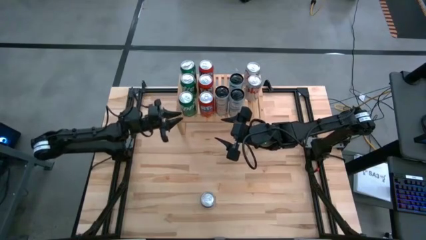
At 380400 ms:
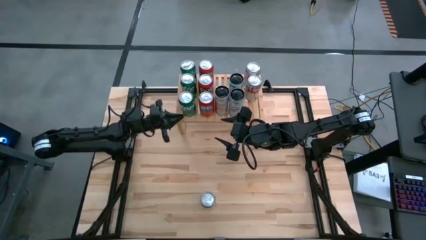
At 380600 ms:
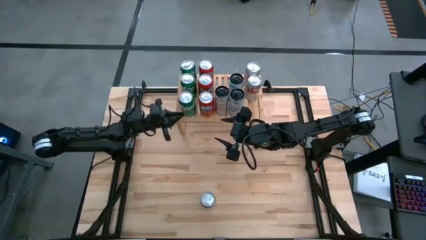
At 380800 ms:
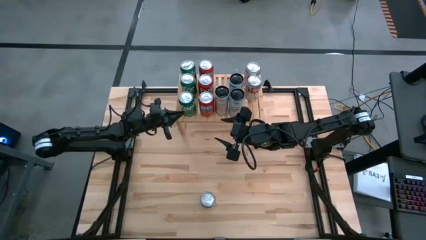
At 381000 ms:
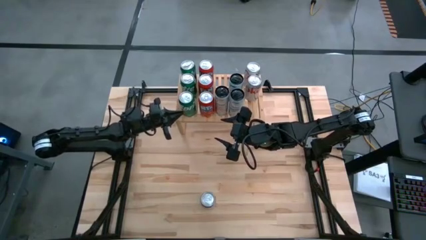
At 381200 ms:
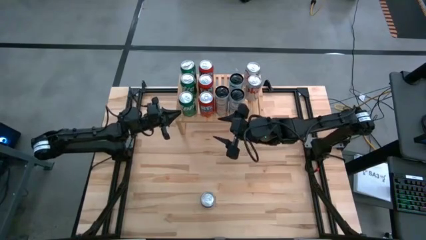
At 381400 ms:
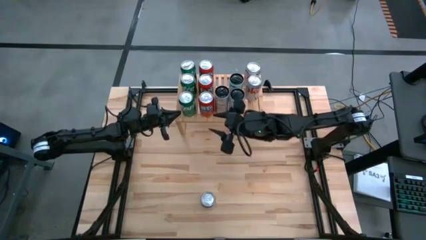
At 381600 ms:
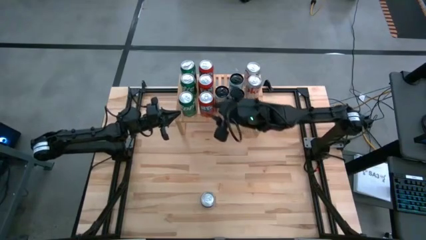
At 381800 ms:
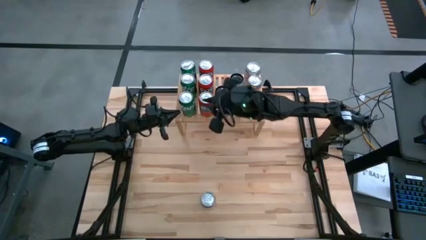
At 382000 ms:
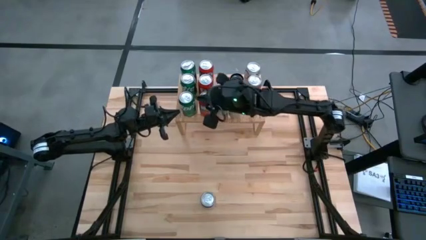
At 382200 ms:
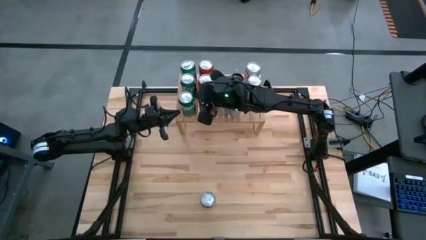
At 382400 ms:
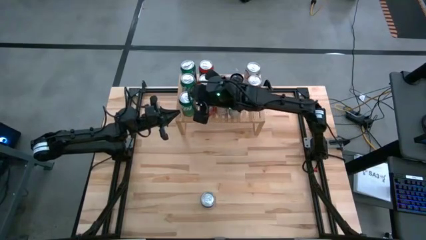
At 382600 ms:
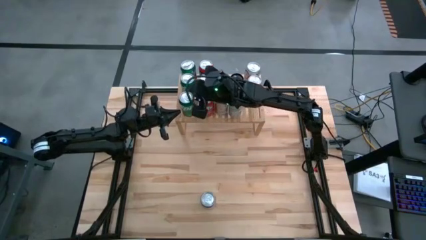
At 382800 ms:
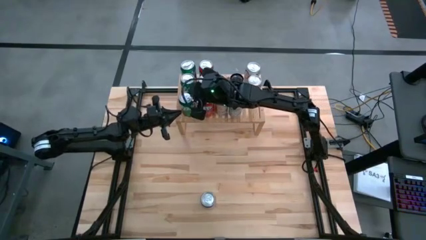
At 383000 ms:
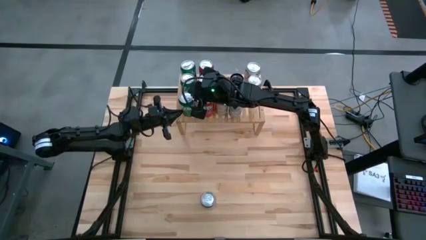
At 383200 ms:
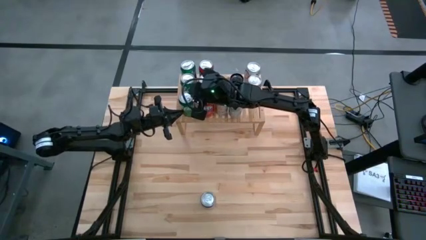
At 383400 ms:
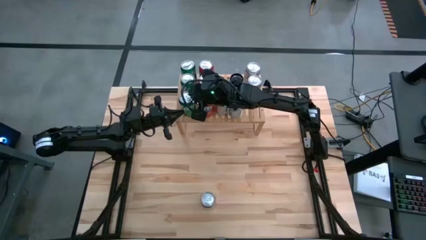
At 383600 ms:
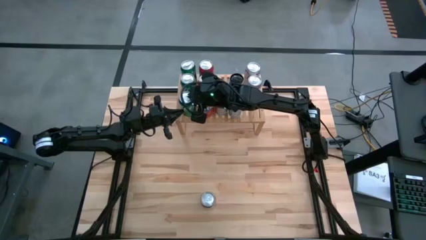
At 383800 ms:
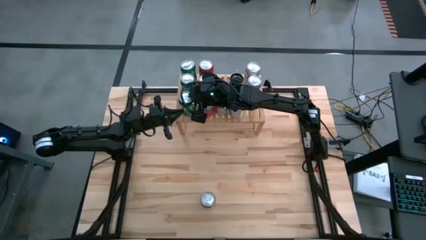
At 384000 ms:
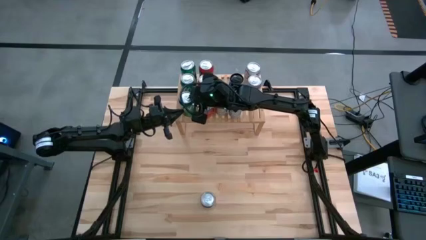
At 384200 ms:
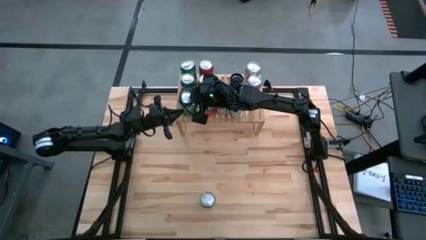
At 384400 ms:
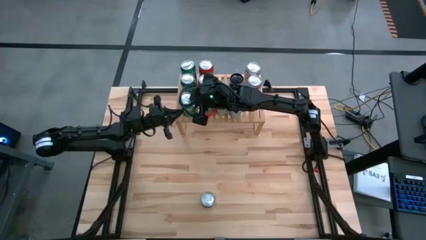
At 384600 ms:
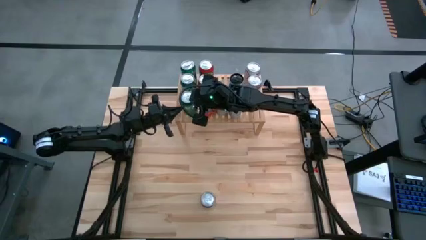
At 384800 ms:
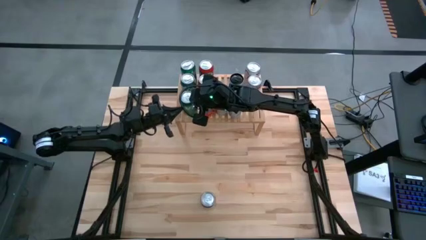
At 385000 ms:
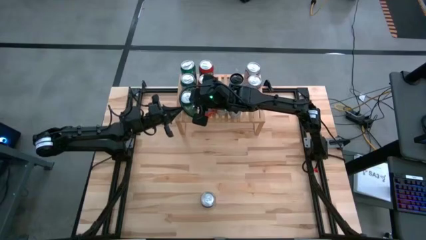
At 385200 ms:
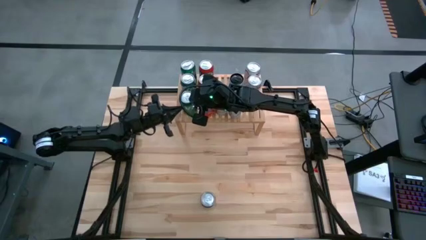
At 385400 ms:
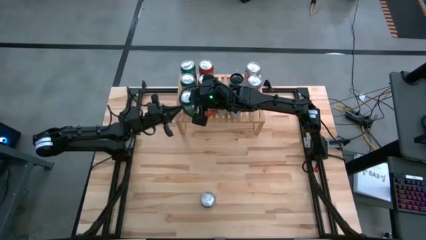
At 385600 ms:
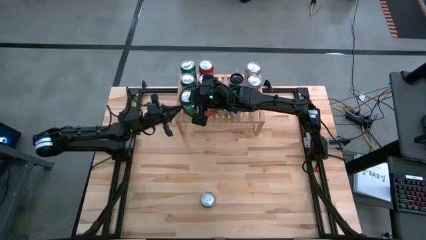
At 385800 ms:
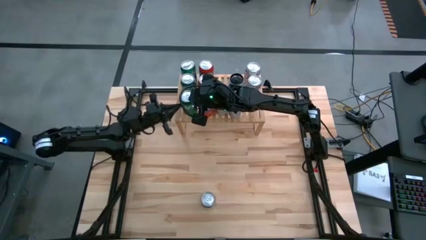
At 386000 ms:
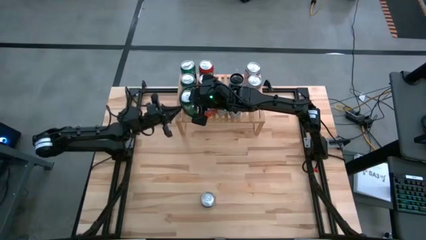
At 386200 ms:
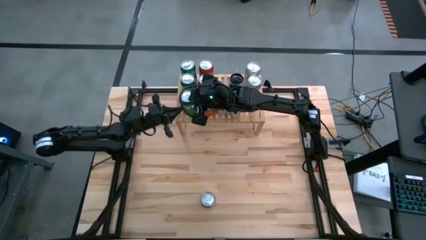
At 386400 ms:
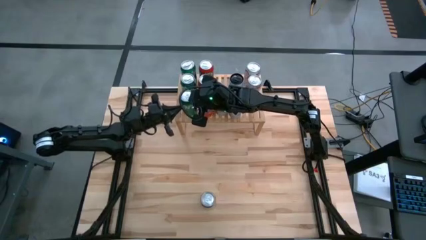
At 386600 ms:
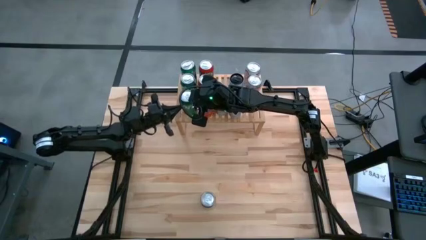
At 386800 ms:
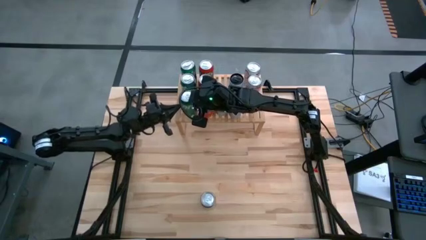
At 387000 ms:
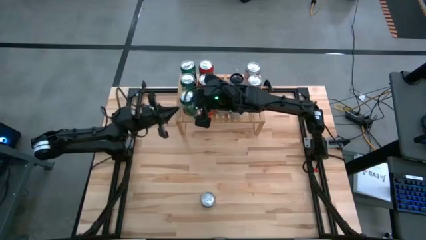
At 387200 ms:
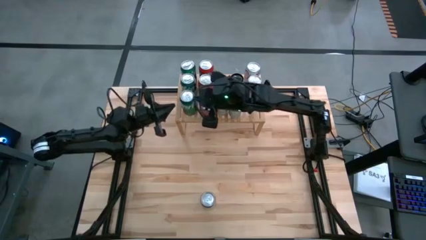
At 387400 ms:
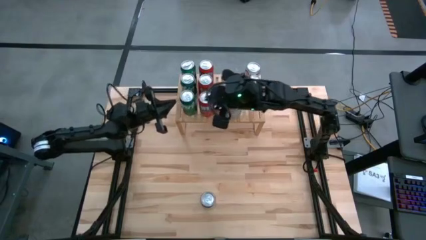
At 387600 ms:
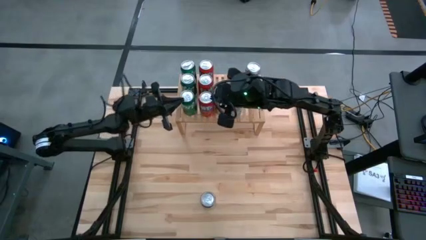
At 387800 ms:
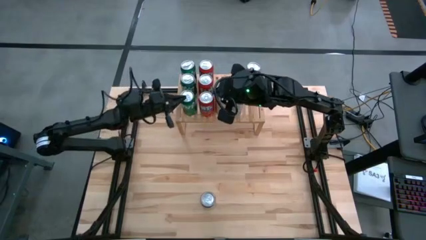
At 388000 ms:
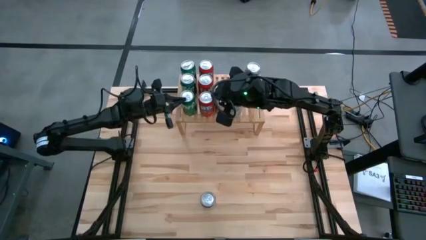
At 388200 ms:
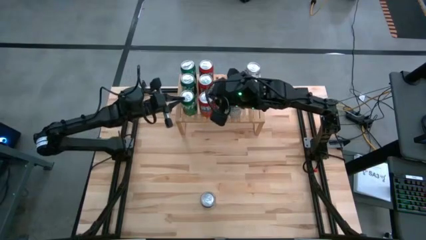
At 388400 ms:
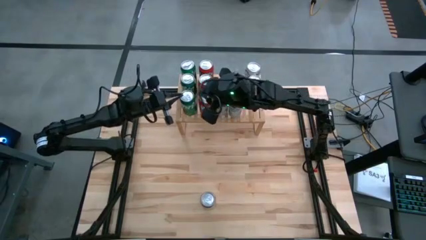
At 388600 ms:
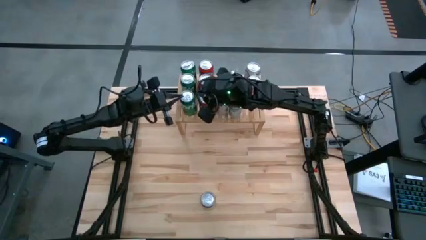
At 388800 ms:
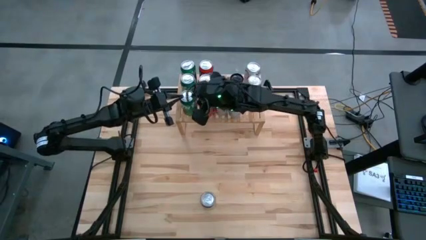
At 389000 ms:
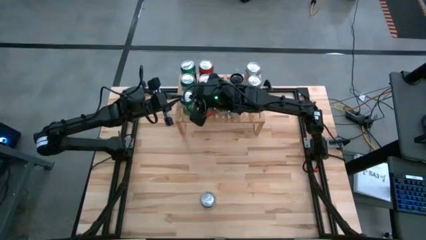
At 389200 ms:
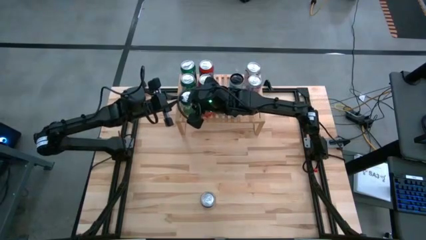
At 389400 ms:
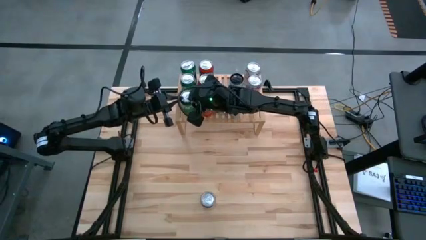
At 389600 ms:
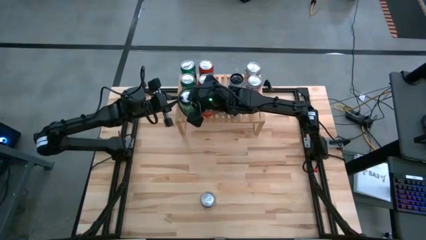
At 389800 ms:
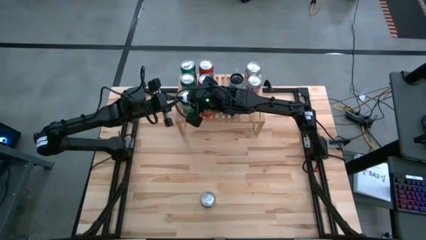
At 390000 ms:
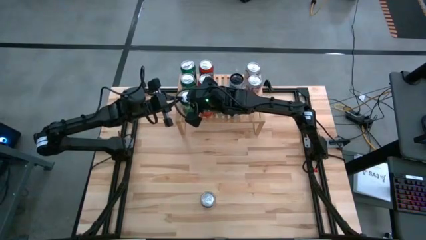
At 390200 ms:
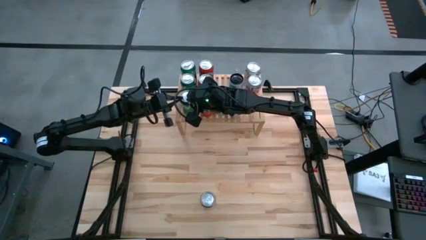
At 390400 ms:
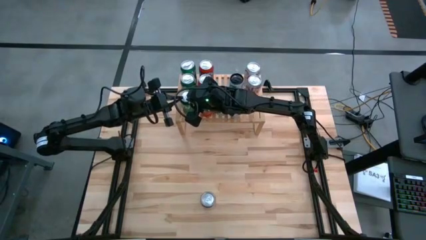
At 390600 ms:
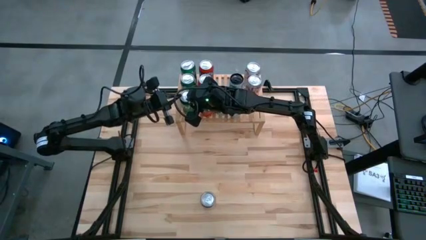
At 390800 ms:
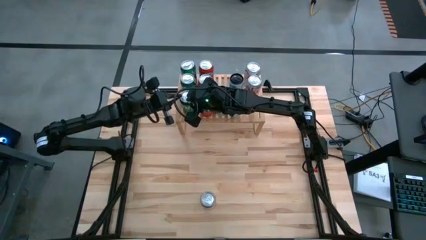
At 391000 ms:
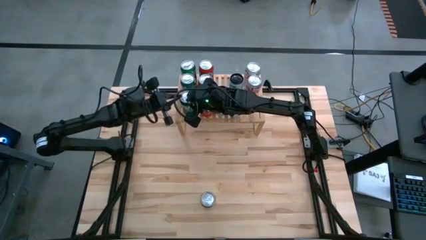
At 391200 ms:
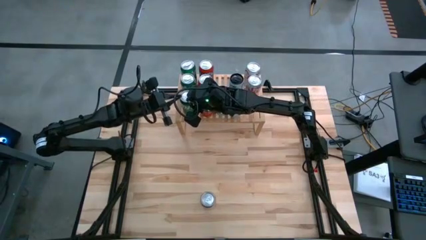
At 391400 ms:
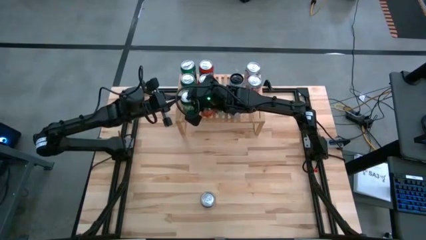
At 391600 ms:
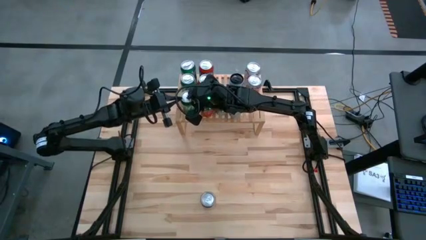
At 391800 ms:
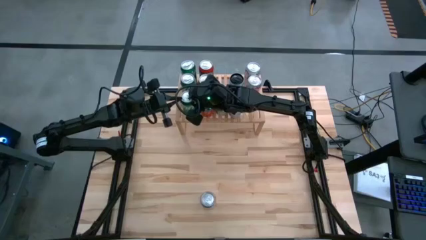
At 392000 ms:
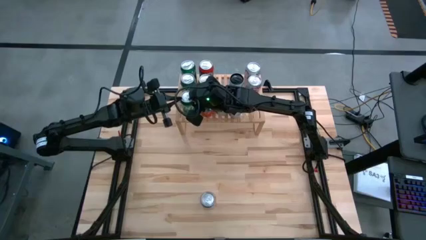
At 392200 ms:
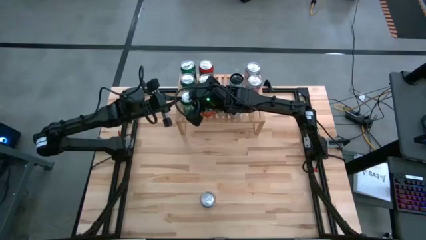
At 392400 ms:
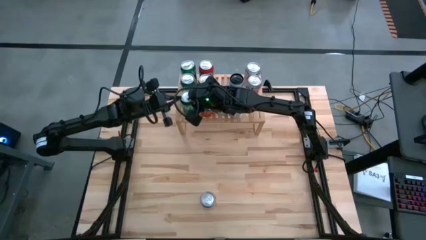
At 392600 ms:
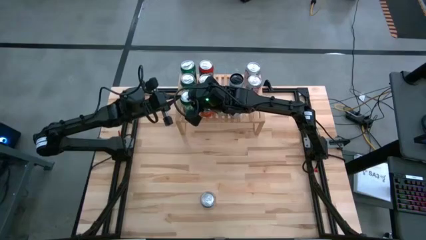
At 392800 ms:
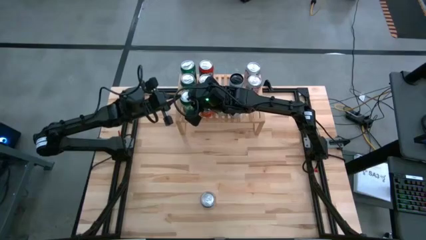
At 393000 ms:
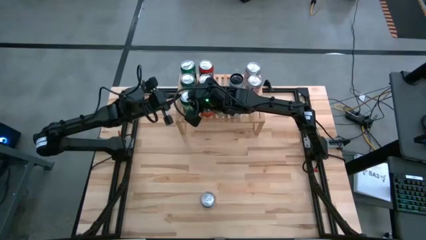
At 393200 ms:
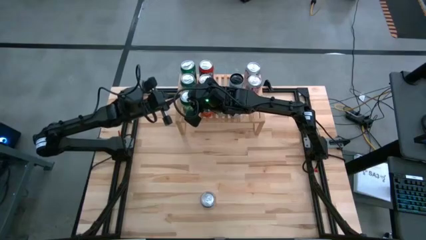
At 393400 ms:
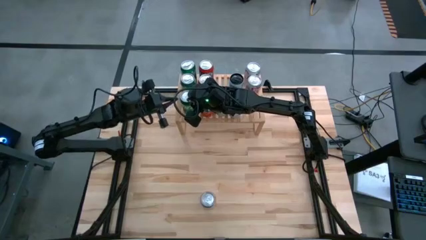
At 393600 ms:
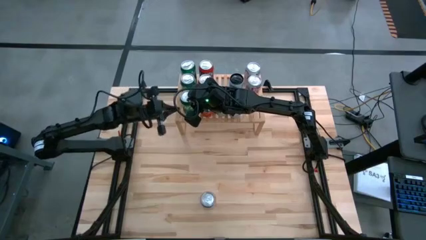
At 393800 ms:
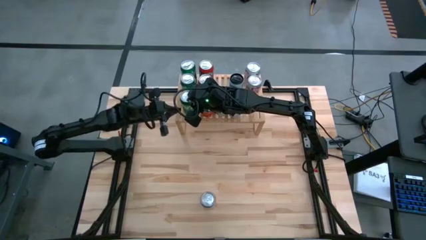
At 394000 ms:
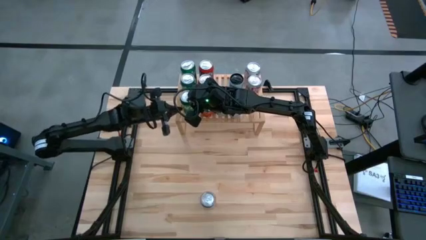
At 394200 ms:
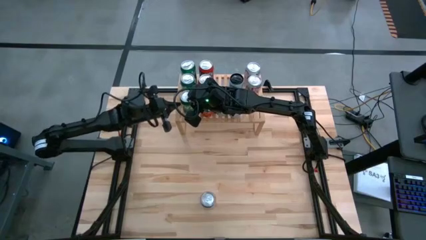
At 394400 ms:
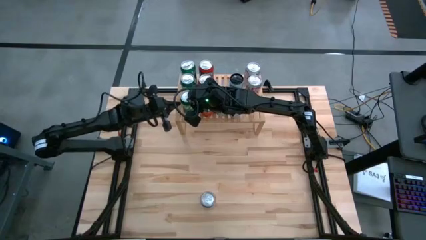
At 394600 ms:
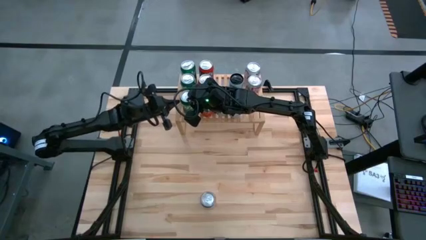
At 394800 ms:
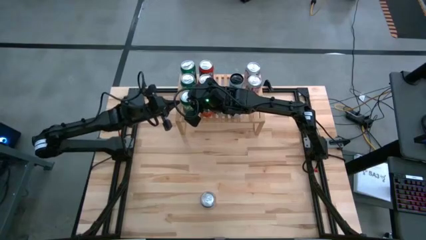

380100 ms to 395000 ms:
Task: Place canned beverage on shelf
Put the green soda can aligned with other green soda can on the shelf
